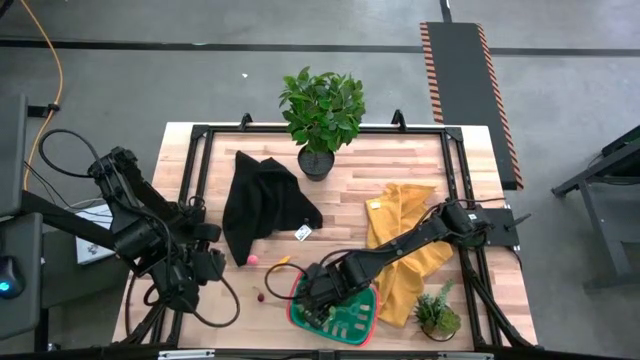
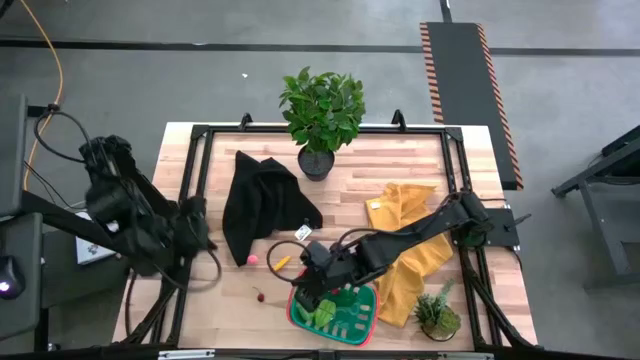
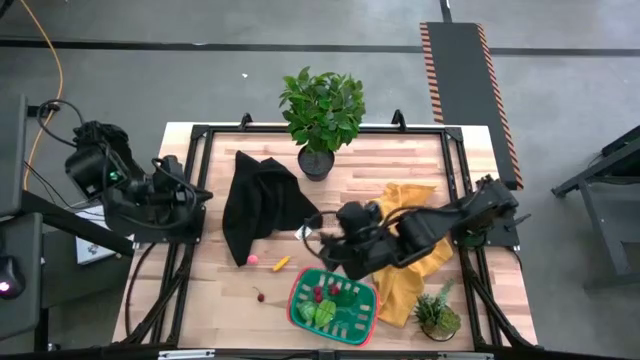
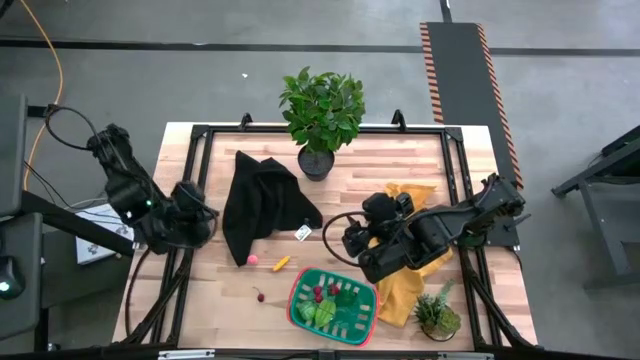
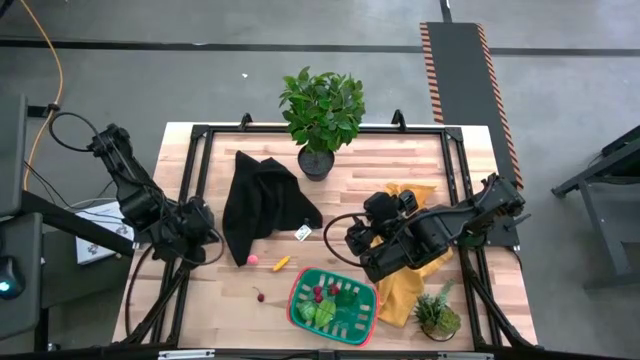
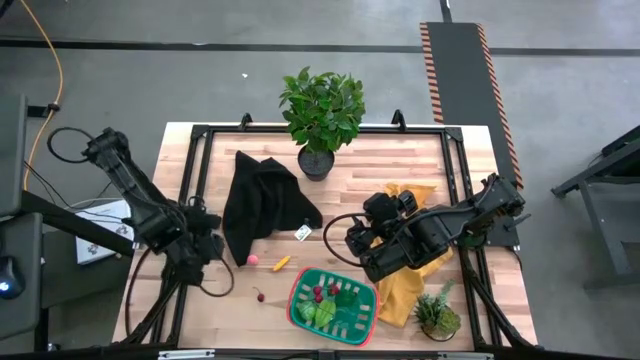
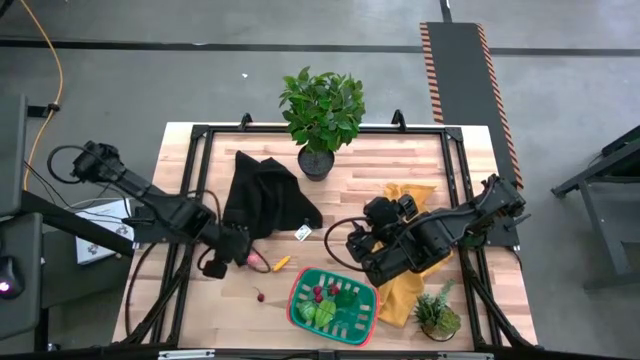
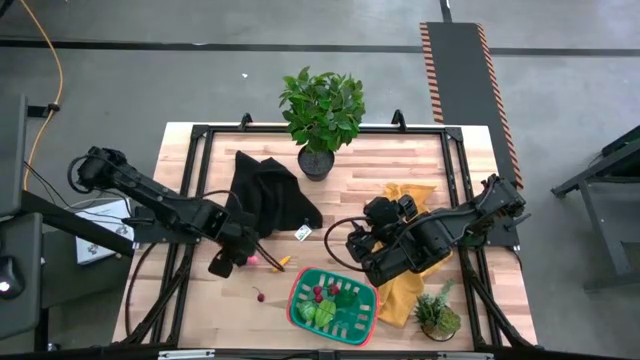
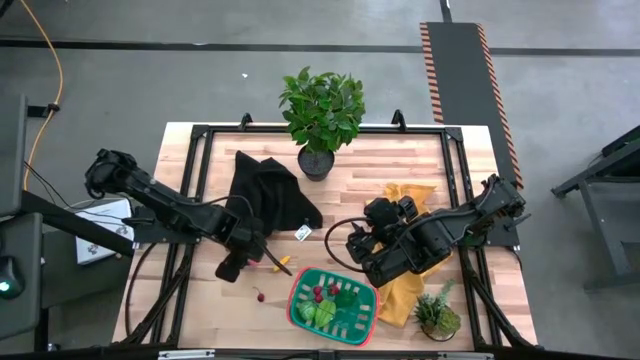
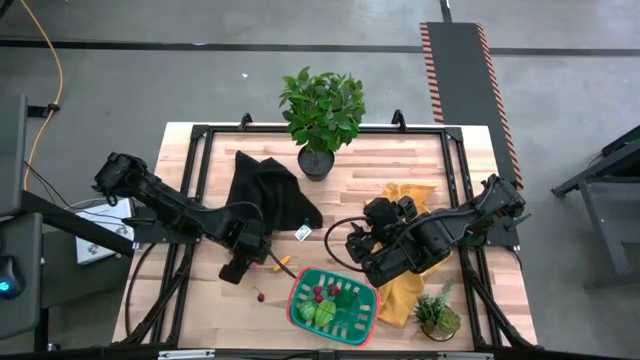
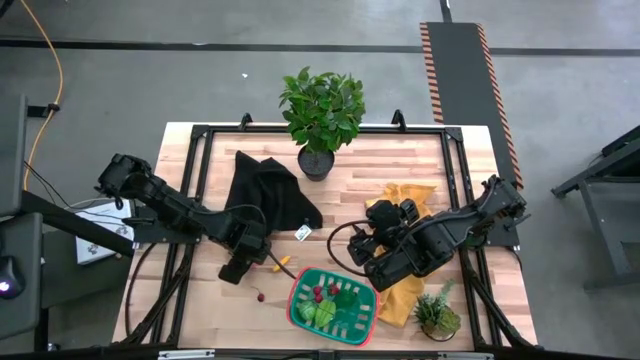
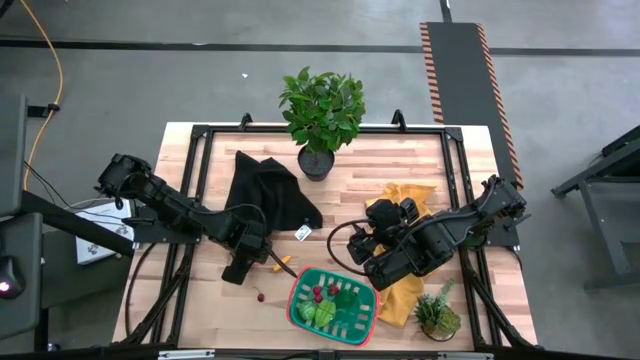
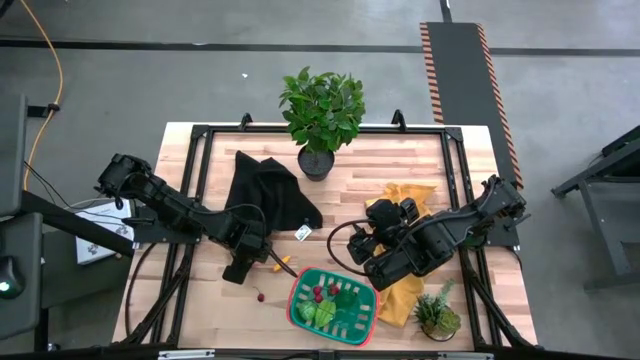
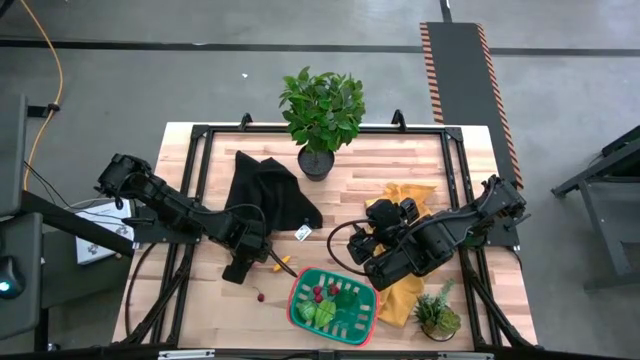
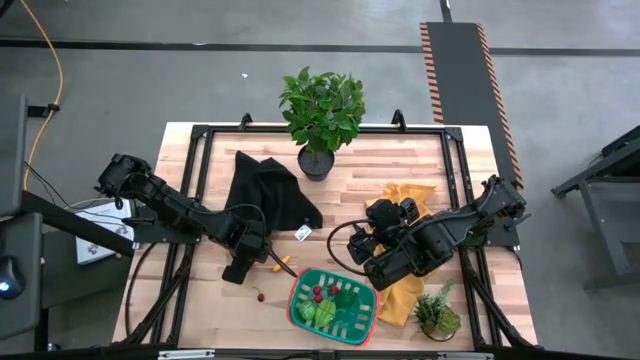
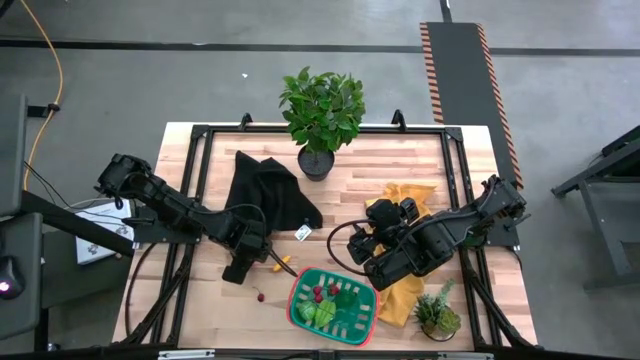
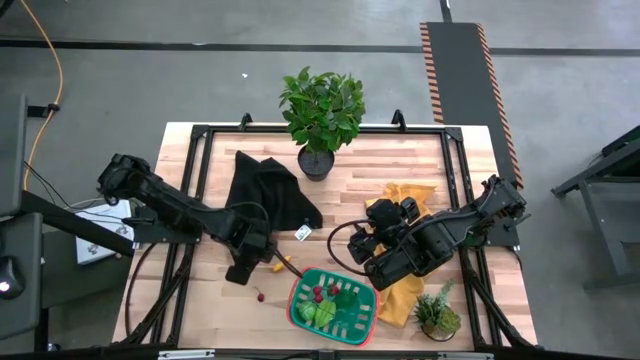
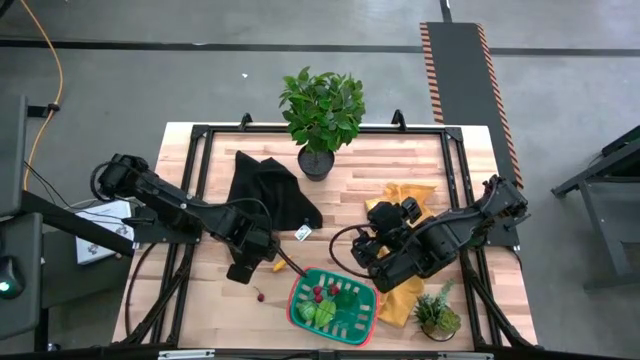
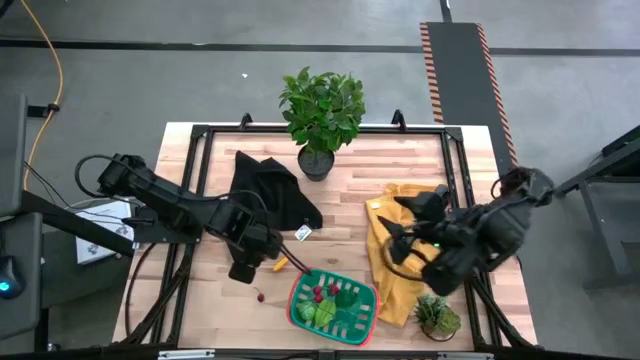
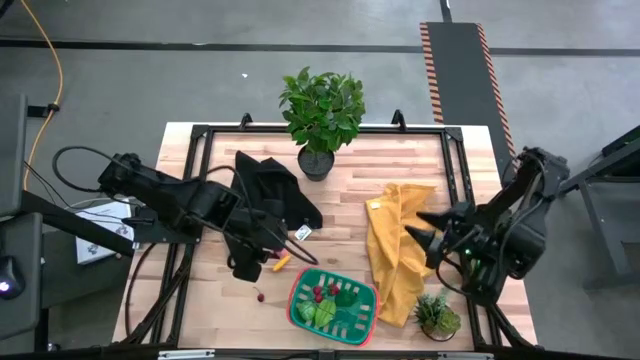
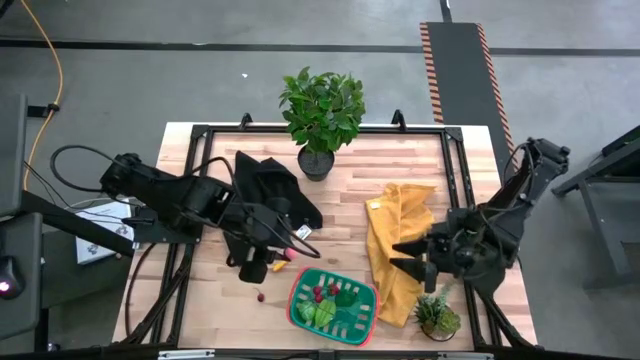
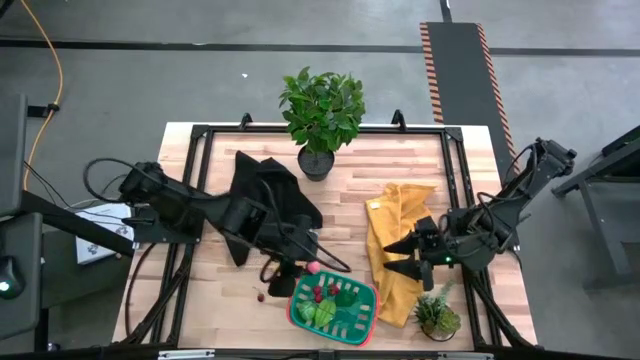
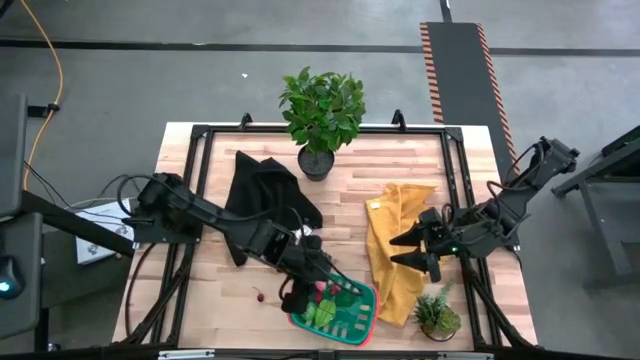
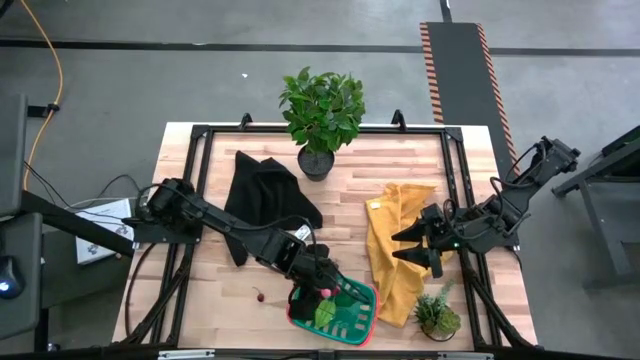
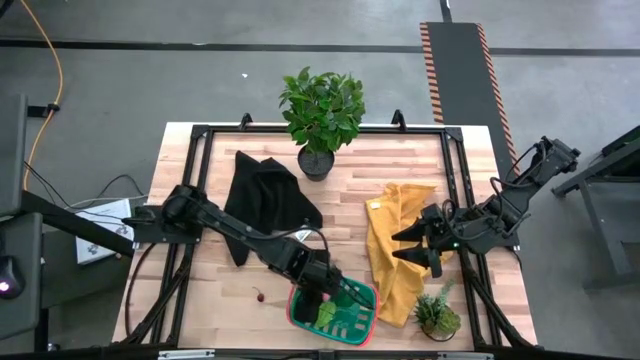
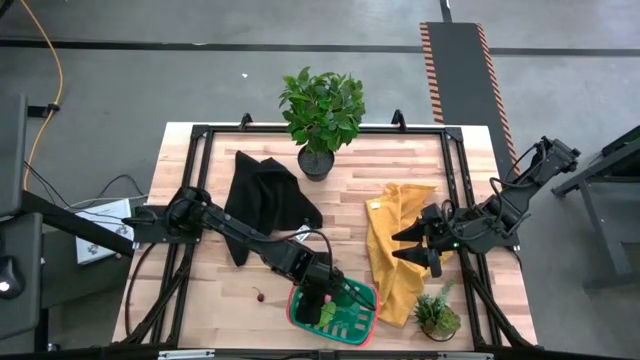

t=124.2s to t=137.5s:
Task: Pick and placing Produce into tupperware
Put the pink peach into the blue bin

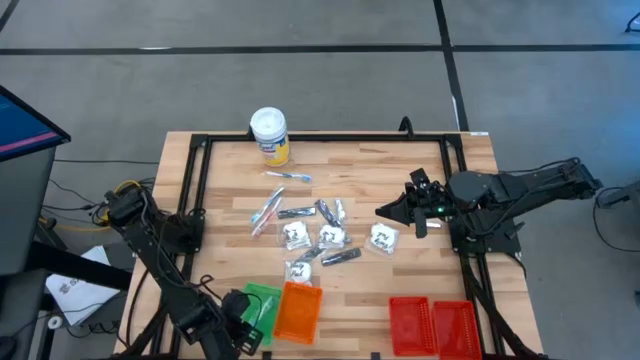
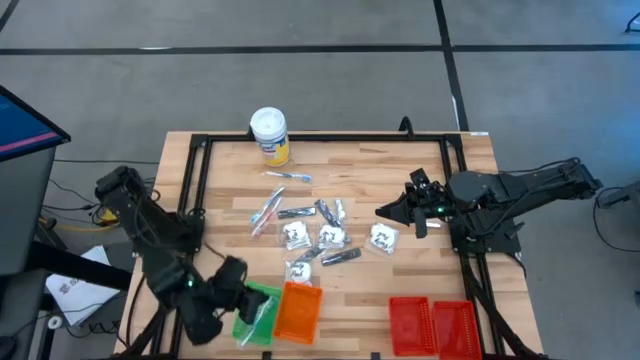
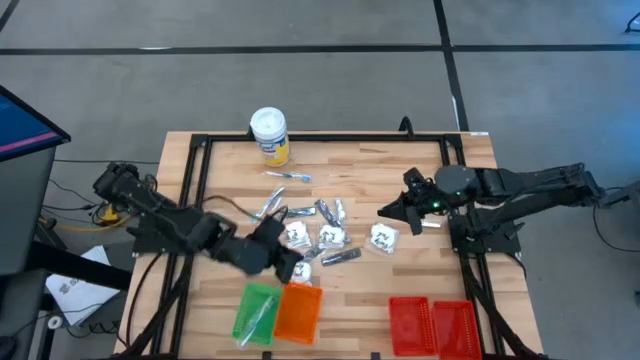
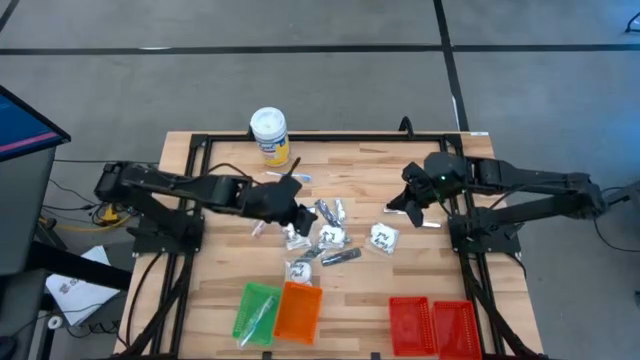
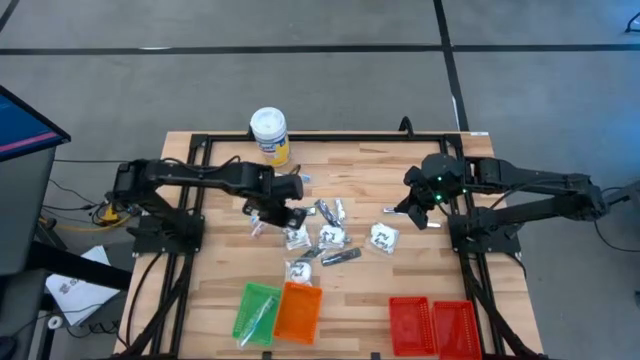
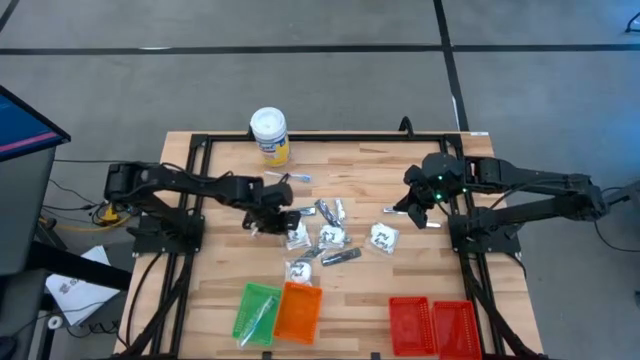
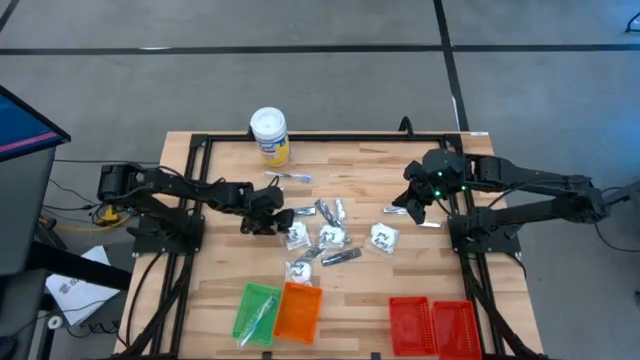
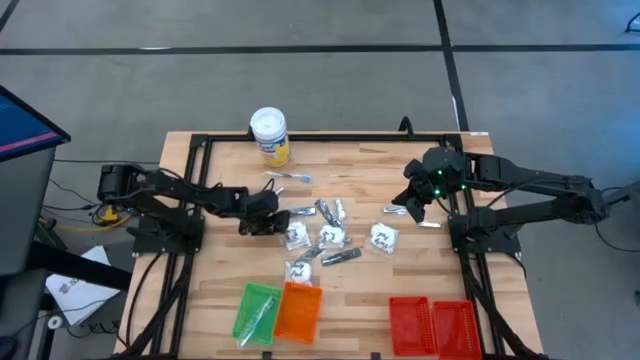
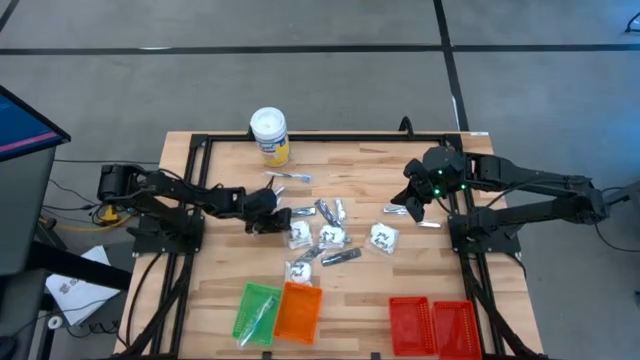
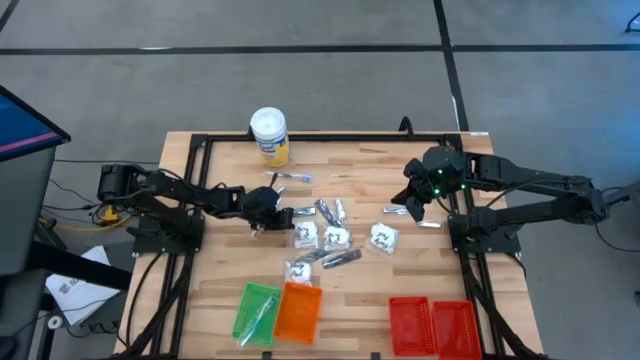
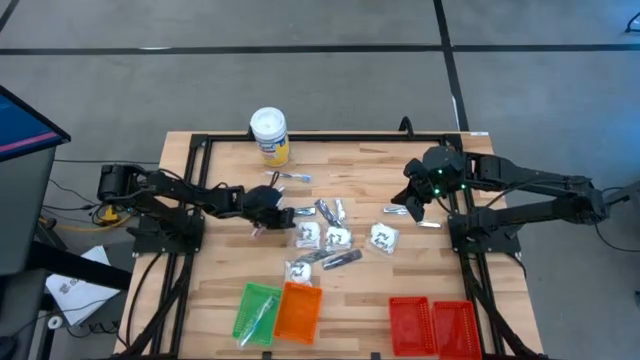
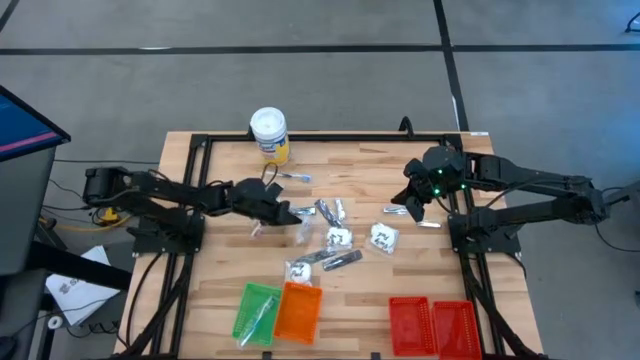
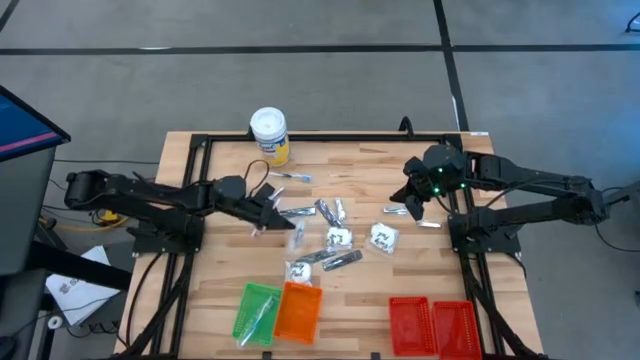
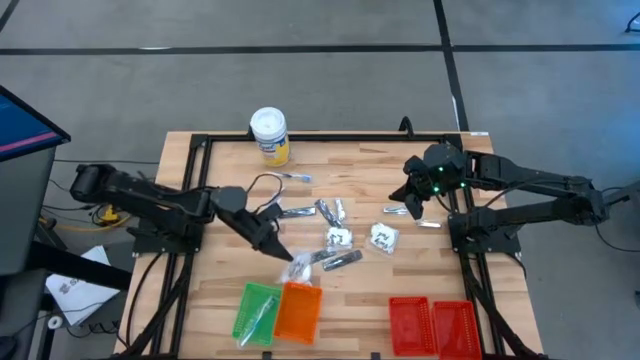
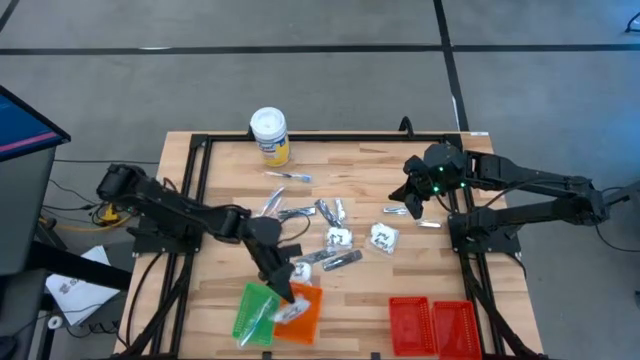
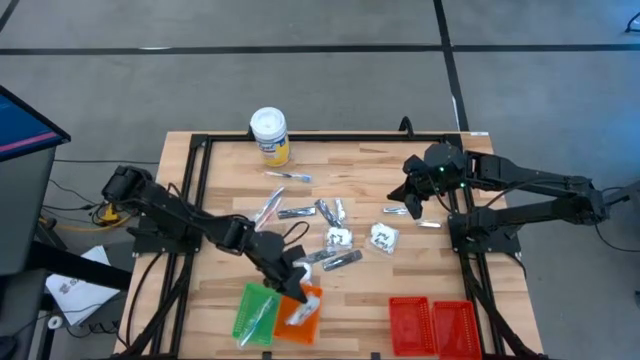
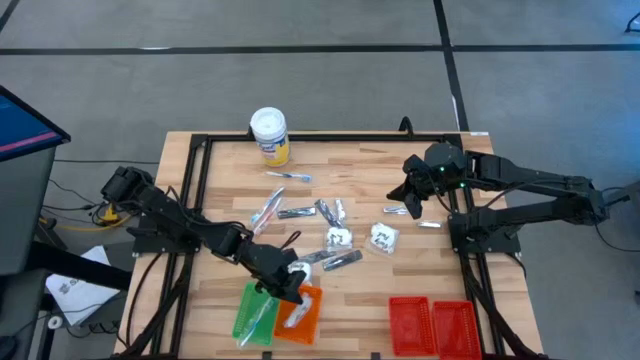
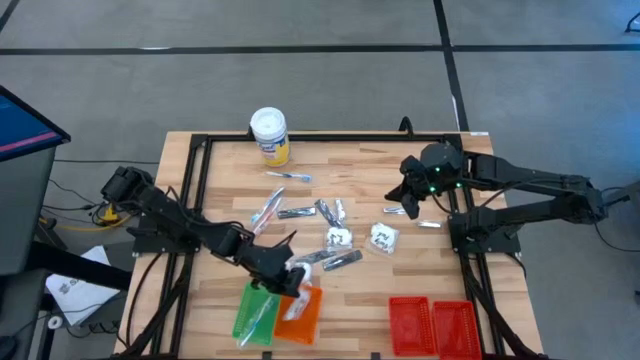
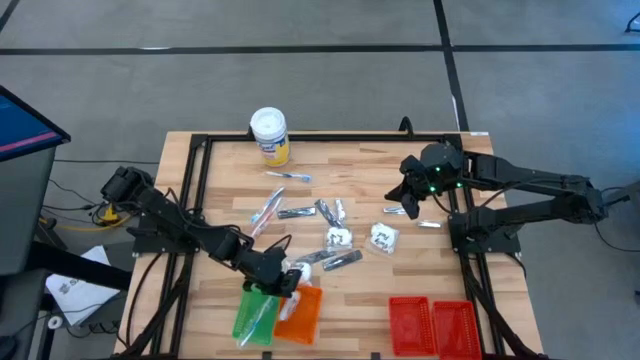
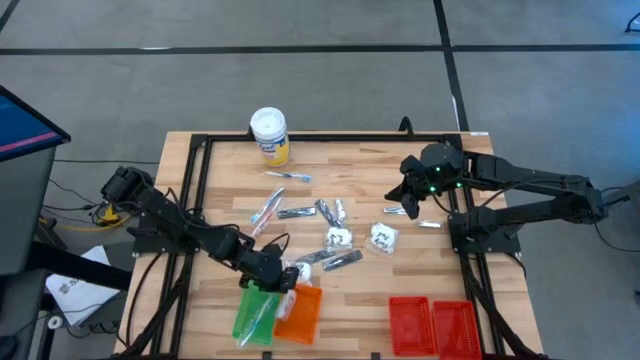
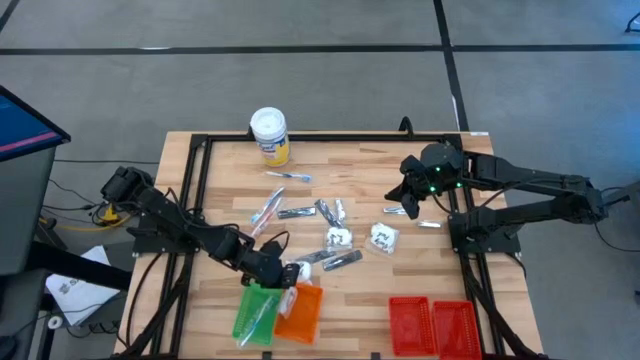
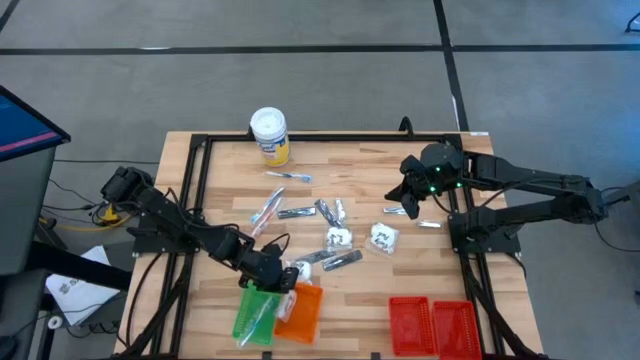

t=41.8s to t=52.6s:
Task: Pick & Place Travel size toiletries
Put the white vanity pack into the orange basket
